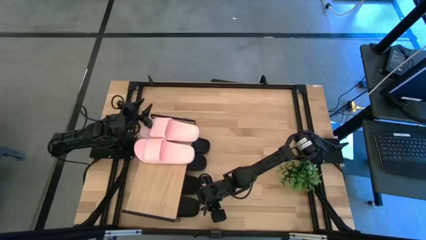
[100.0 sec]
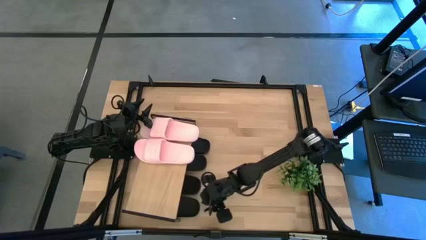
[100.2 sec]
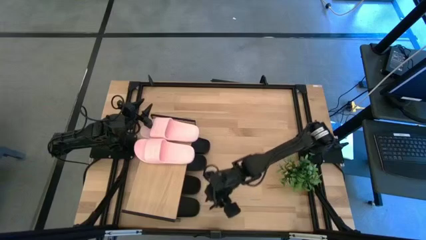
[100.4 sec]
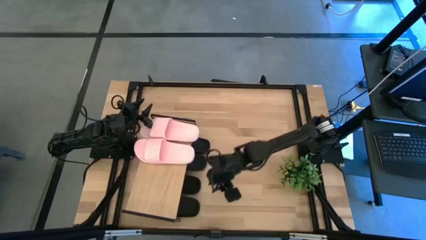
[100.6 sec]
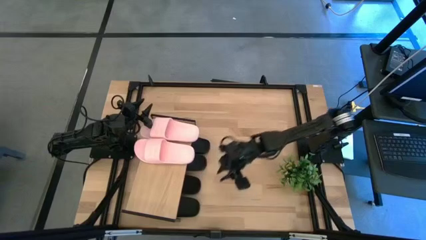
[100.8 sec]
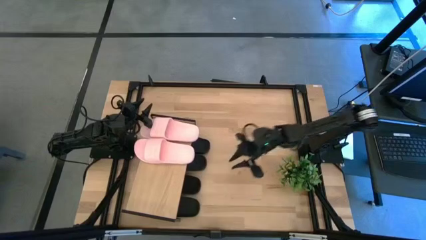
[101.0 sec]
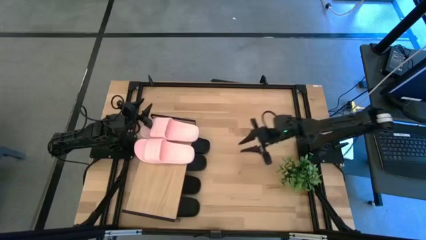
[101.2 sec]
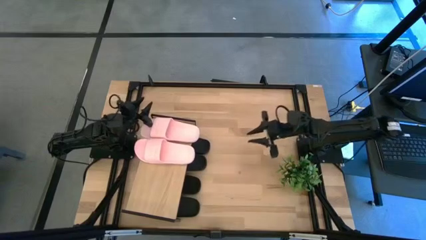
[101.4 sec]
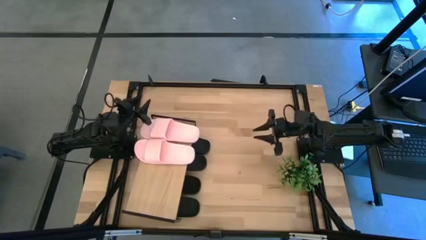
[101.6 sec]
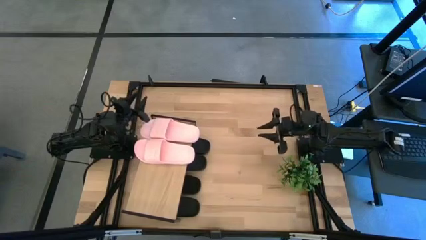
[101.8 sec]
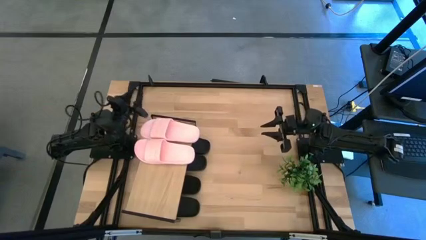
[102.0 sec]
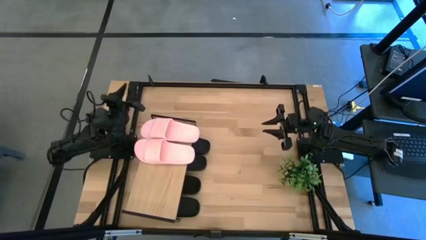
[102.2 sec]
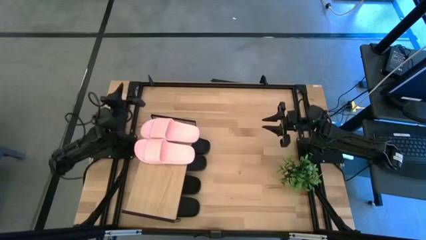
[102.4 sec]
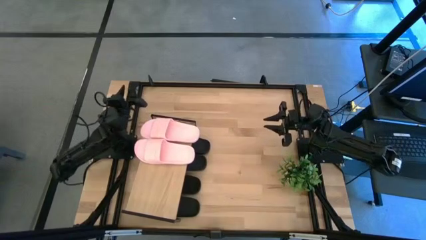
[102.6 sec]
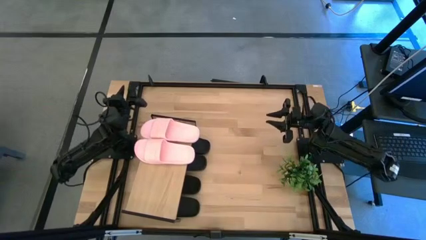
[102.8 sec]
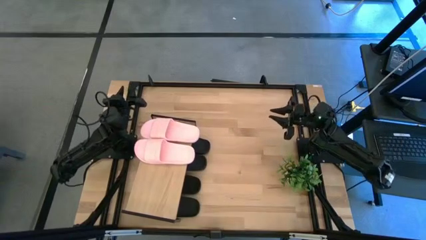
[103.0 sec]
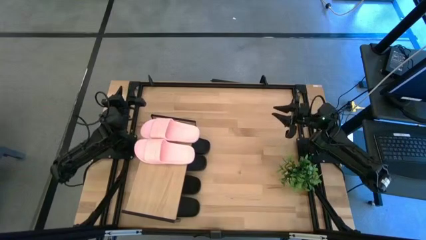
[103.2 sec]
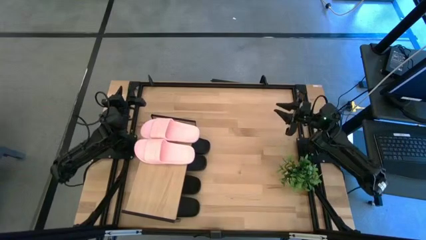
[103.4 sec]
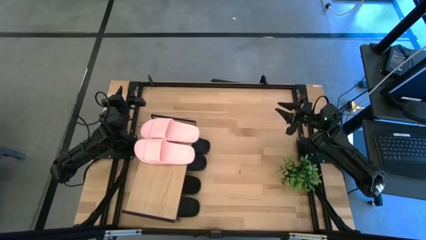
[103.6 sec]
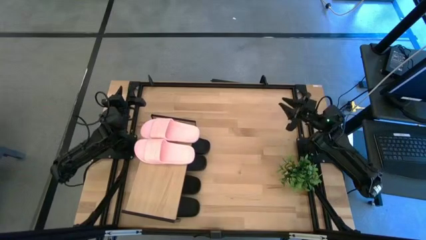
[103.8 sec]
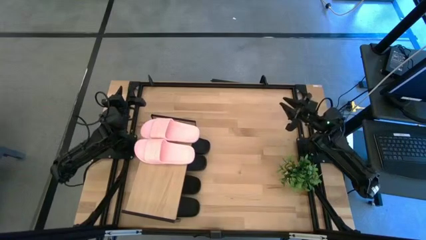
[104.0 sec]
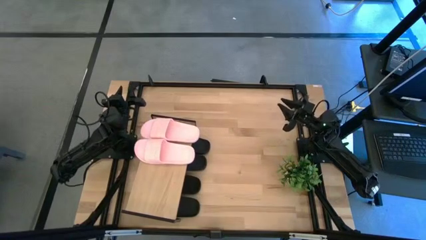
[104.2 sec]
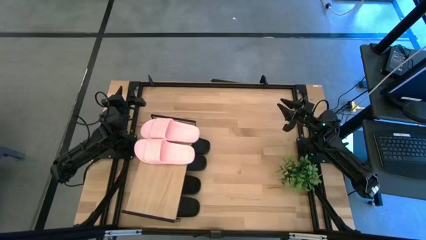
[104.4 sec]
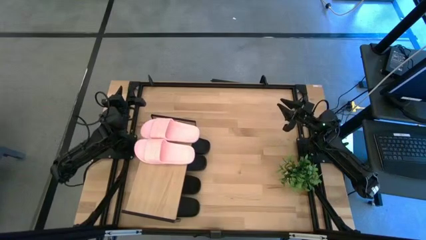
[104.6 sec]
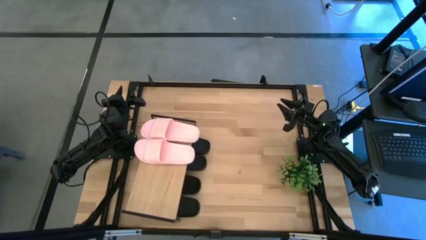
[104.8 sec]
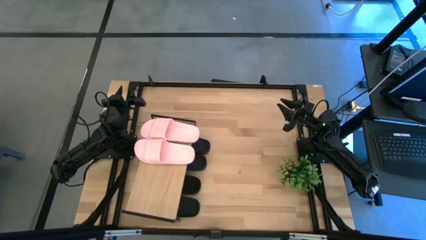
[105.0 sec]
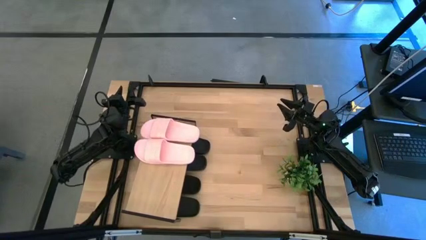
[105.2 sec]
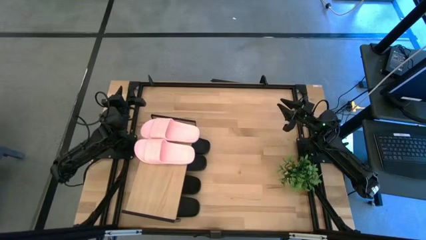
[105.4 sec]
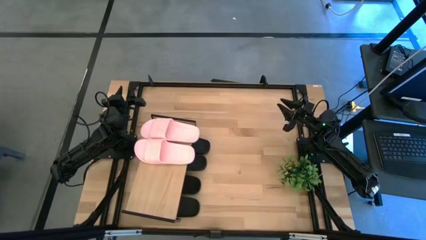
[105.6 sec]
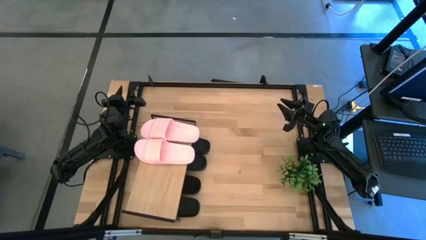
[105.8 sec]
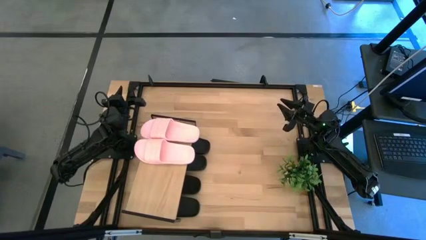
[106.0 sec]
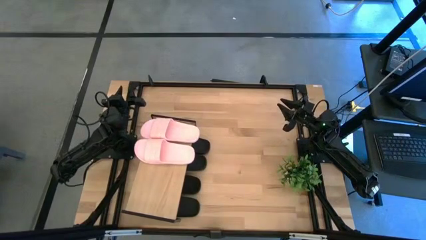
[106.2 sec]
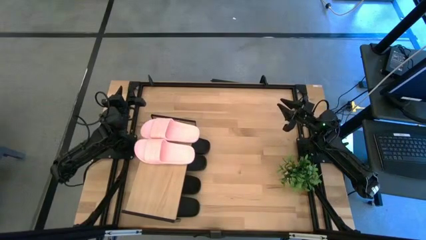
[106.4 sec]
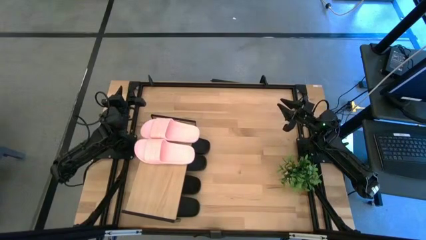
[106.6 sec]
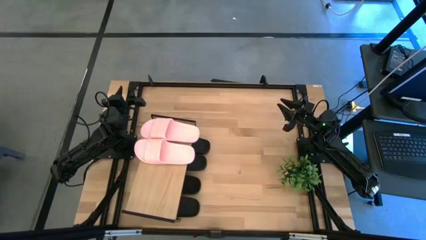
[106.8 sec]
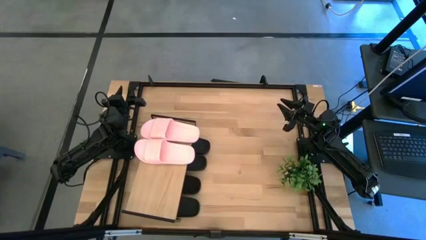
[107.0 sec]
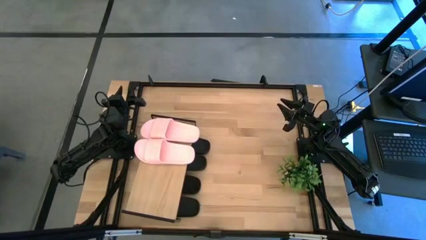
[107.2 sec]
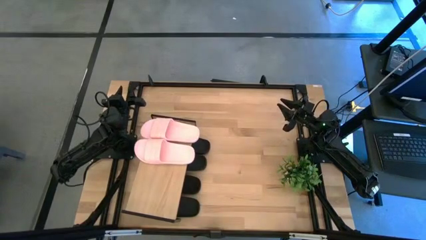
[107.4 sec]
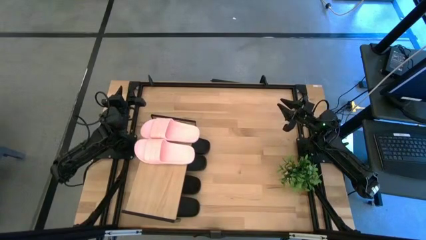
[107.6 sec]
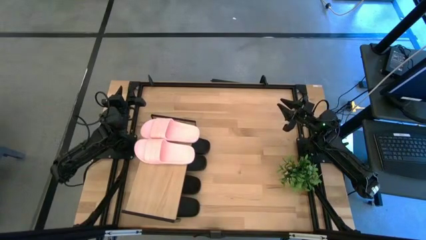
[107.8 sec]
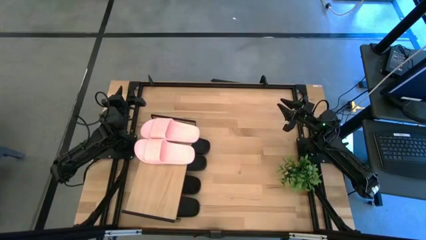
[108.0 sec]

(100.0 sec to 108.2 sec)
Task: Pick and place slides into the shelf
Return to Home Position

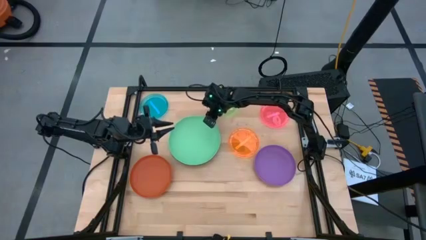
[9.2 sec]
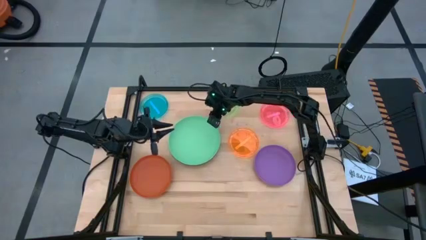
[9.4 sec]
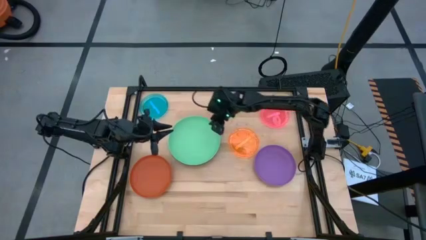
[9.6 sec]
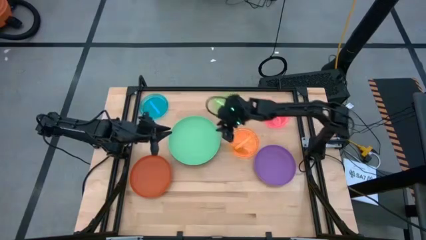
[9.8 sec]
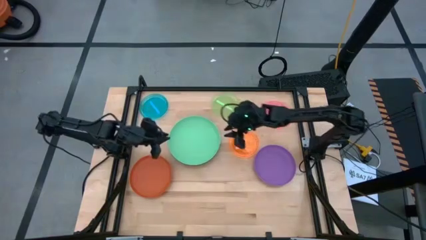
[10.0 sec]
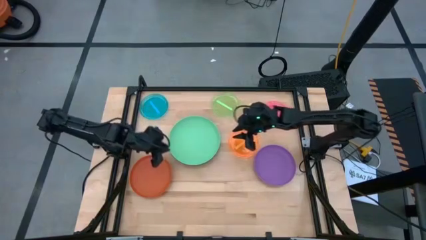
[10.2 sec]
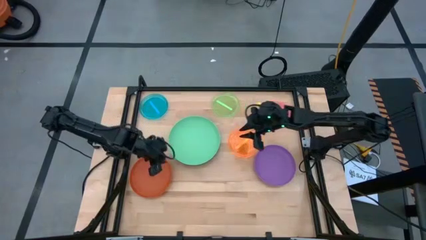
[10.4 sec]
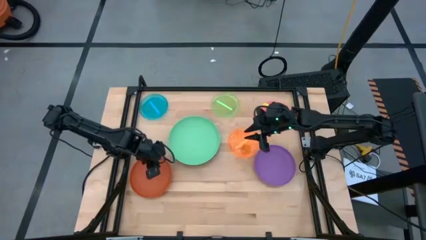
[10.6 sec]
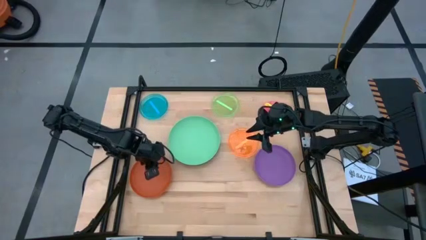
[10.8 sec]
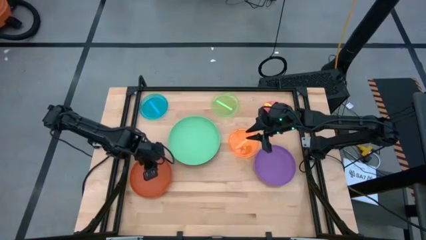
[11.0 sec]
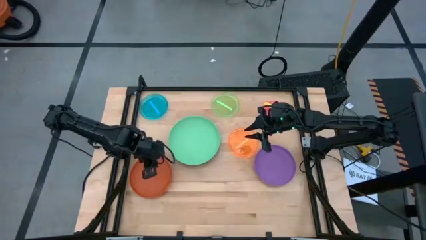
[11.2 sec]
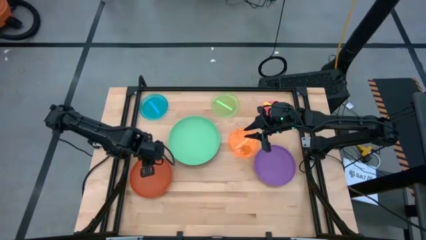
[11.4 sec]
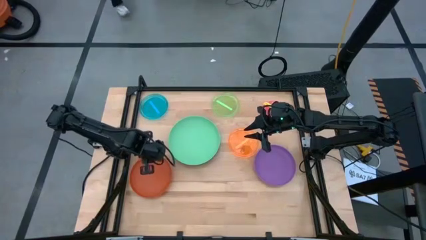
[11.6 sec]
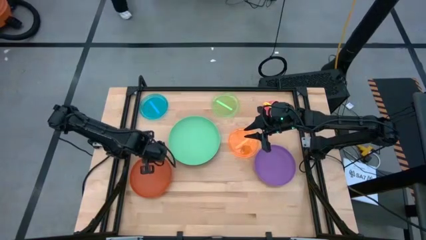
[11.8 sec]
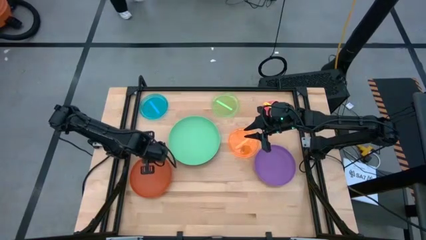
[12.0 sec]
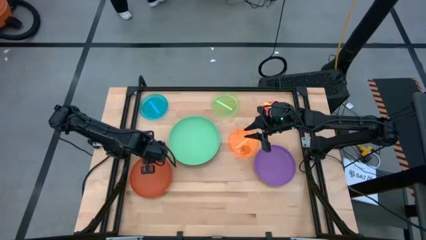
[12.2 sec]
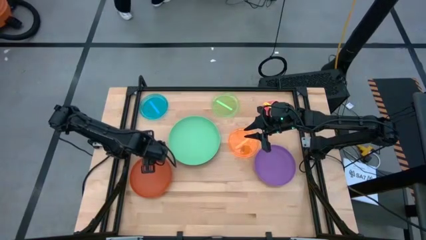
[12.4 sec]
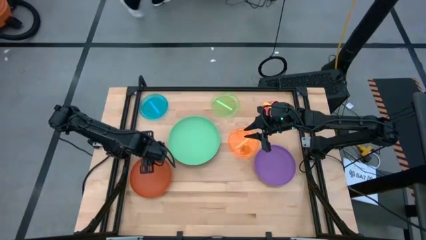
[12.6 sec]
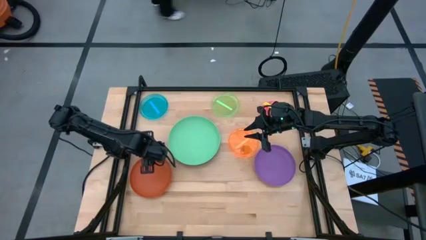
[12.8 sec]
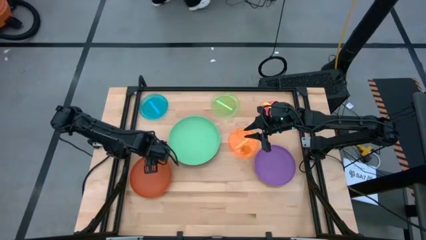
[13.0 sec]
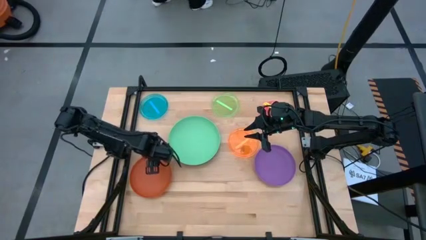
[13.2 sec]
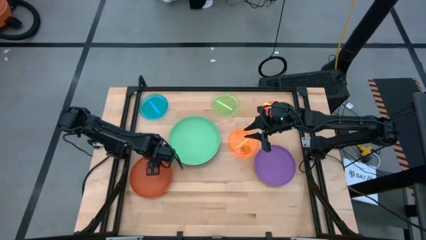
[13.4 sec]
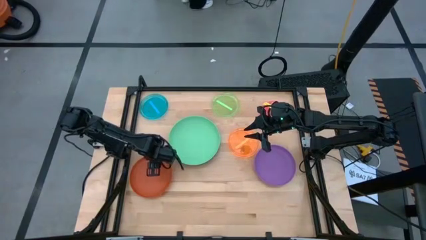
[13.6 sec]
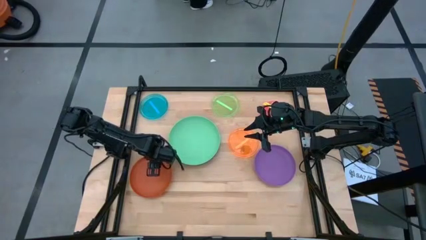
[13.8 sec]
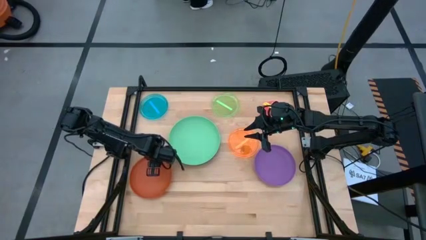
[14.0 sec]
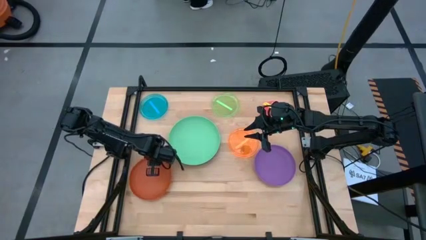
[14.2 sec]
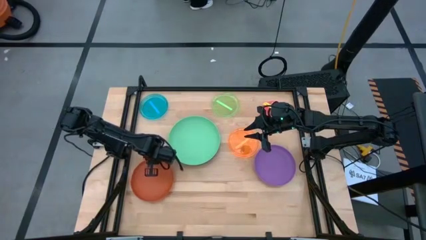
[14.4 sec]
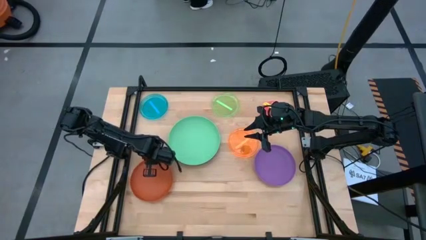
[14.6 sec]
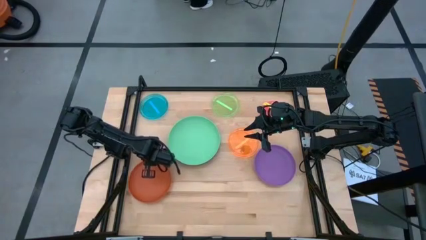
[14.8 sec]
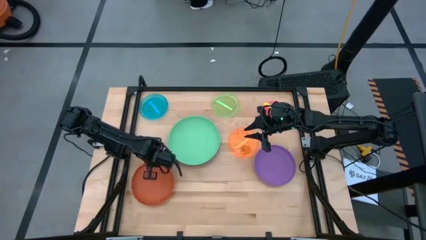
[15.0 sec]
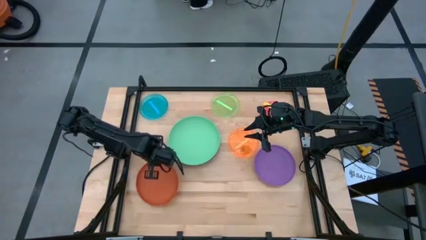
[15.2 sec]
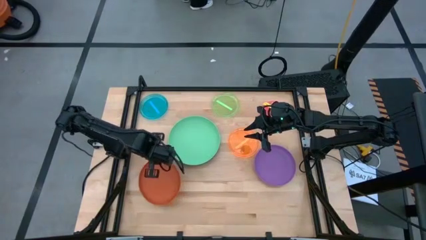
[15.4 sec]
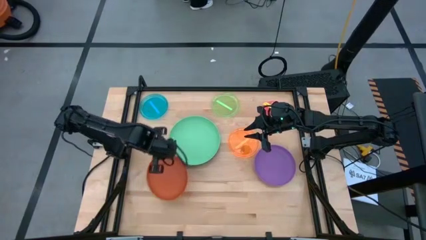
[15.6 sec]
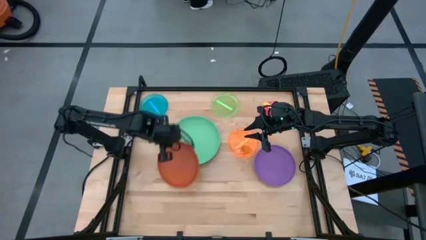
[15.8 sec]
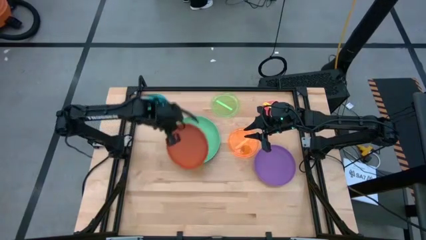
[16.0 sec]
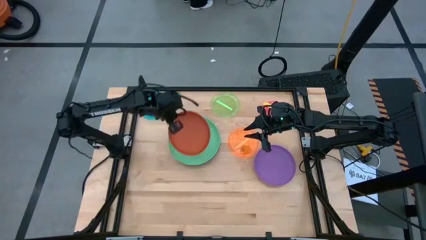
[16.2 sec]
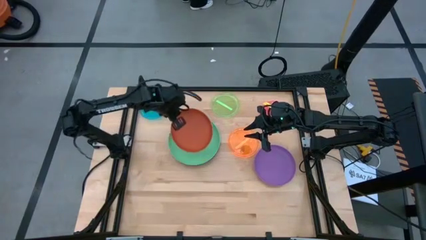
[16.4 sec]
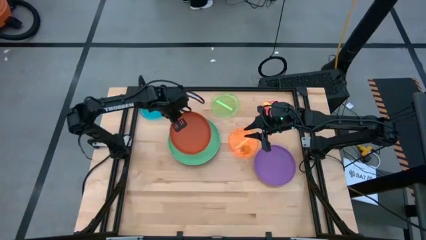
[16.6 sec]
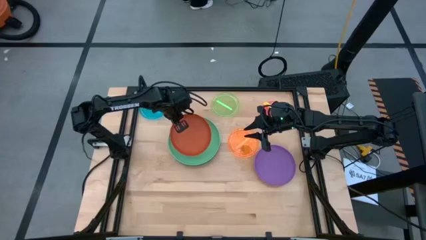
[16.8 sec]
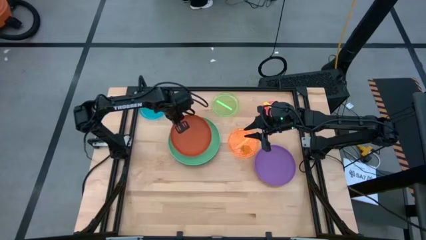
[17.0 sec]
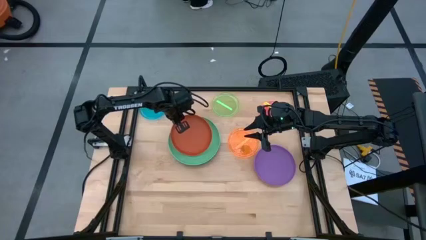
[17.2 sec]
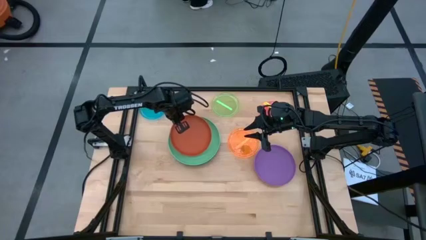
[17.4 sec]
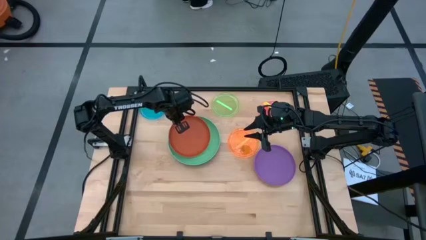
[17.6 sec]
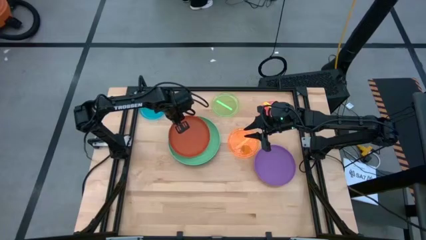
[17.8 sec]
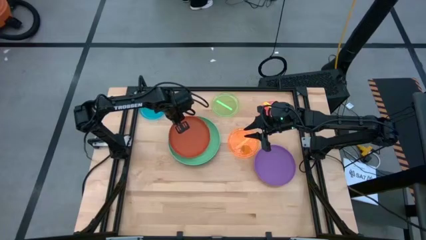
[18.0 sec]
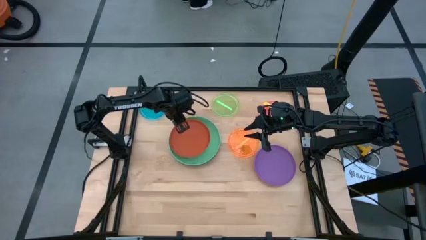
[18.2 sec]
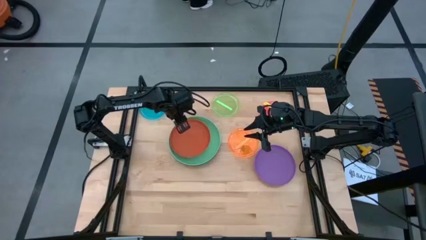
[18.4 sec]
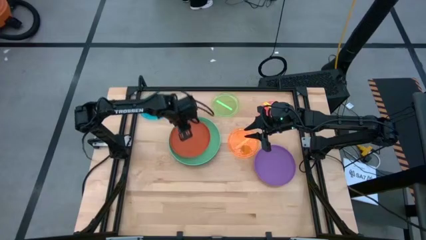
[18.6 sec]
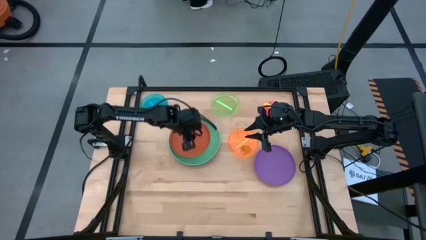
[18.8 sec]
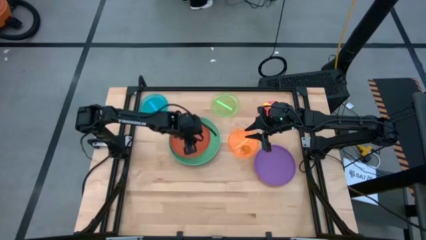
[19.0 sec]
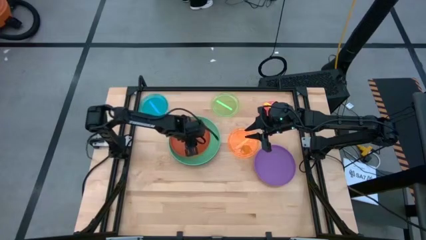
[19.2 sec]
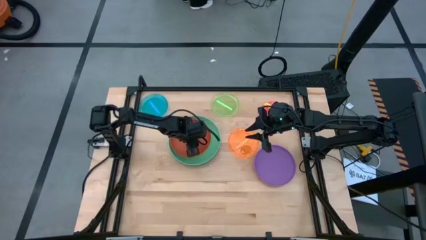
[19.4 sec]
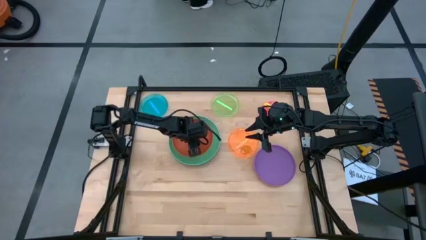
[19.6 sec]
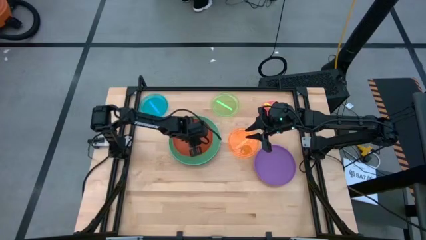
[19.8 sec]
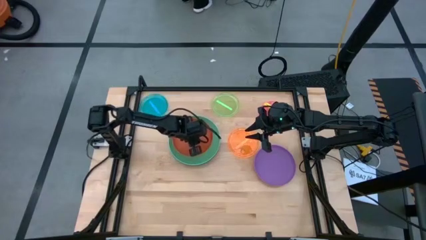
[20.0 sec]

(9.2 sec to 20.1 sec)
Task: Stack plastic plates
Stack the orange plate on top of the light green plate
